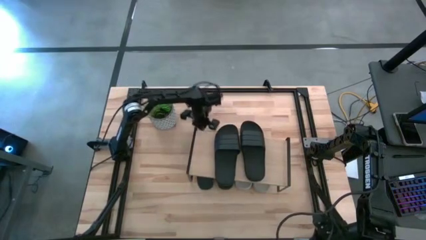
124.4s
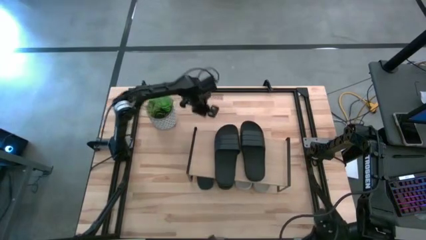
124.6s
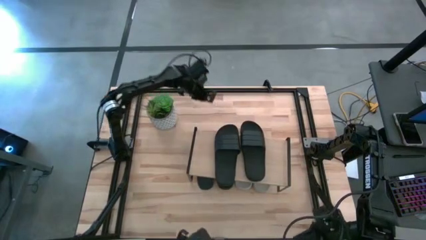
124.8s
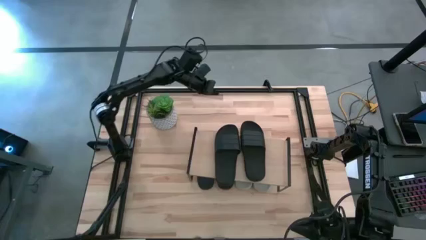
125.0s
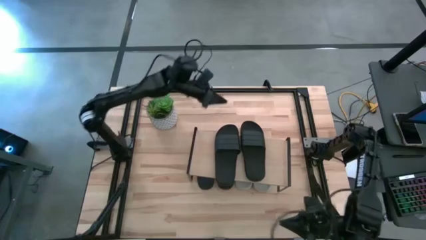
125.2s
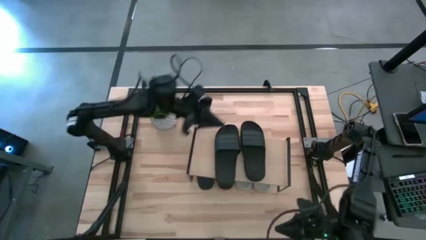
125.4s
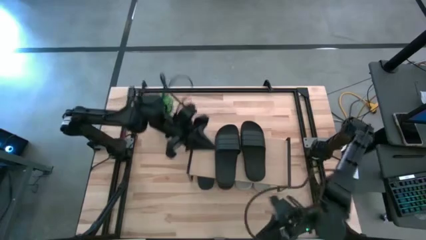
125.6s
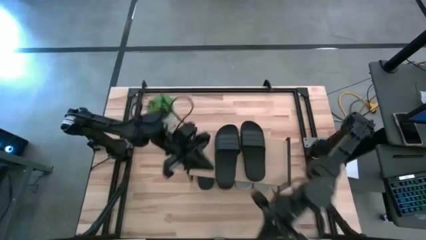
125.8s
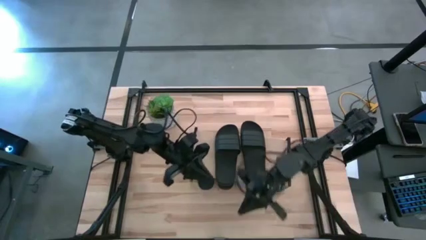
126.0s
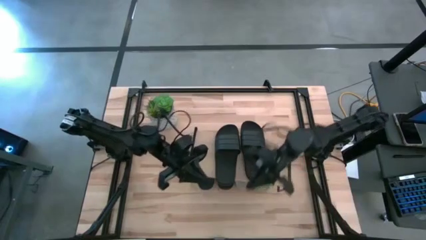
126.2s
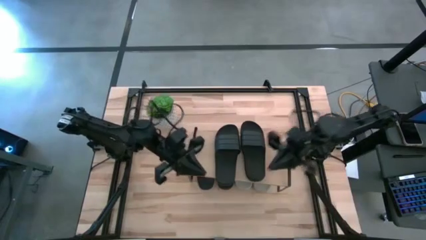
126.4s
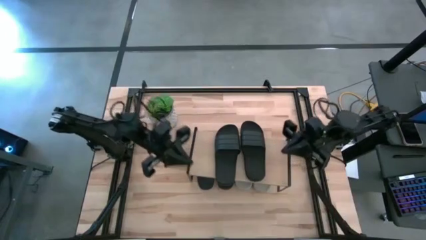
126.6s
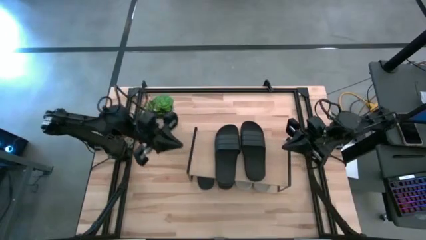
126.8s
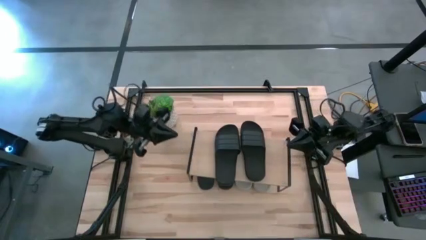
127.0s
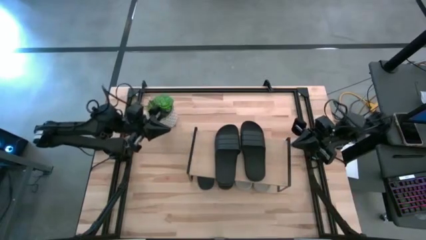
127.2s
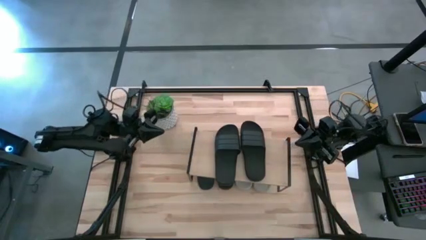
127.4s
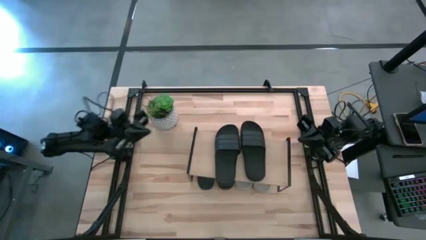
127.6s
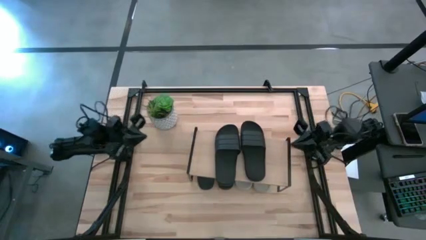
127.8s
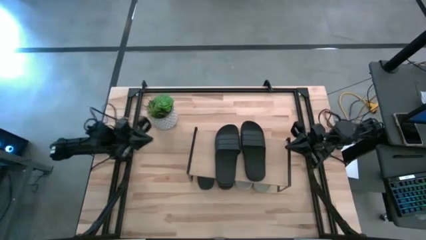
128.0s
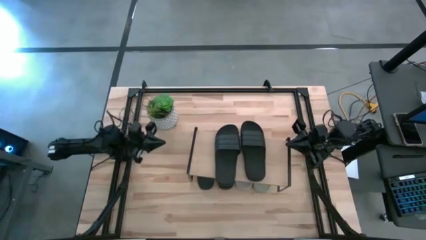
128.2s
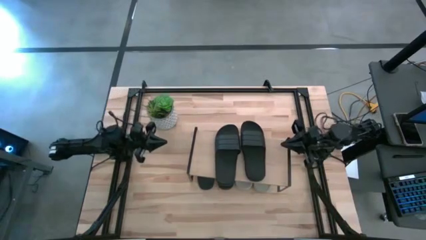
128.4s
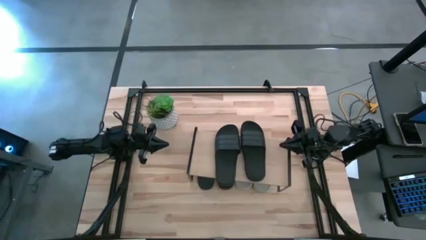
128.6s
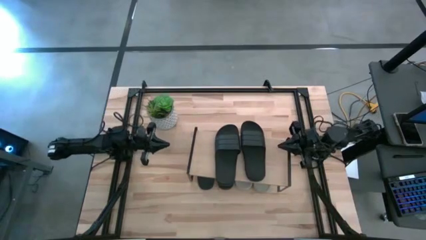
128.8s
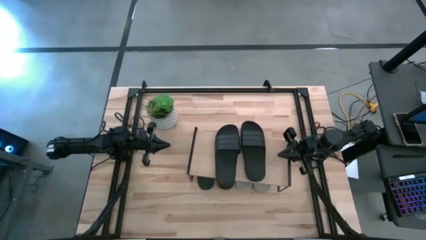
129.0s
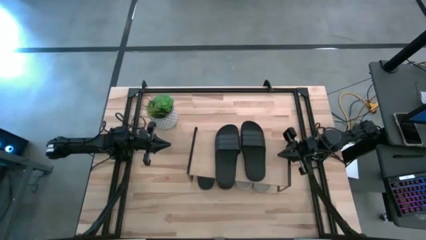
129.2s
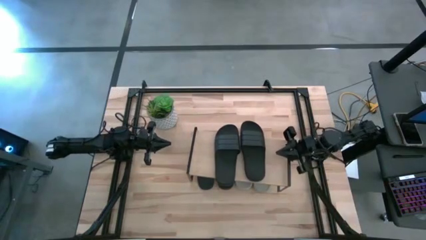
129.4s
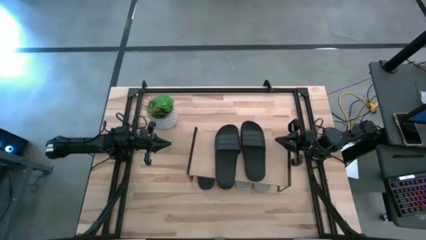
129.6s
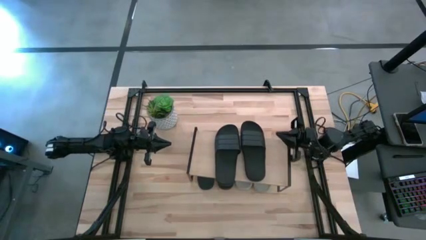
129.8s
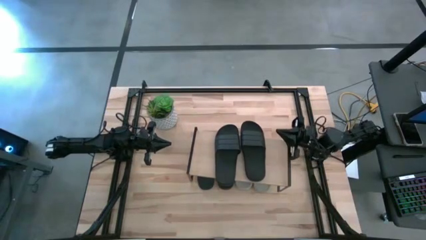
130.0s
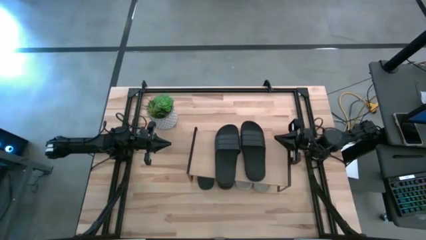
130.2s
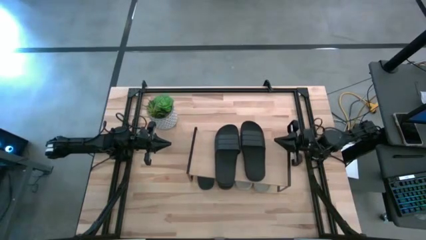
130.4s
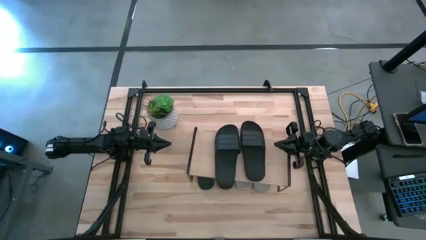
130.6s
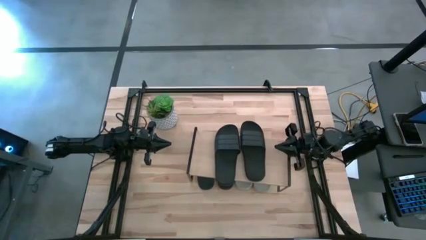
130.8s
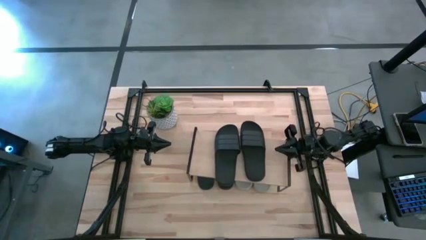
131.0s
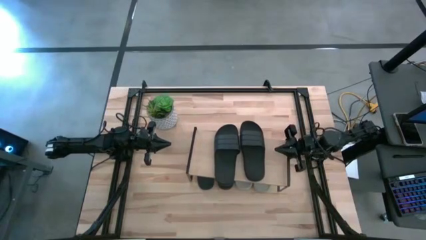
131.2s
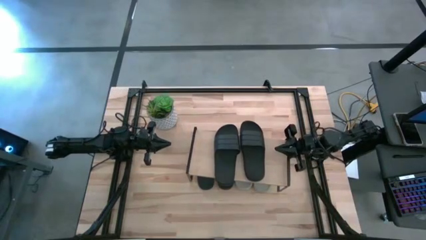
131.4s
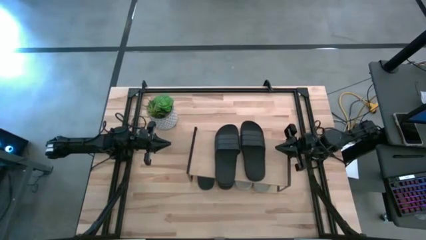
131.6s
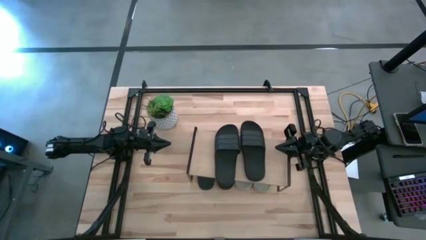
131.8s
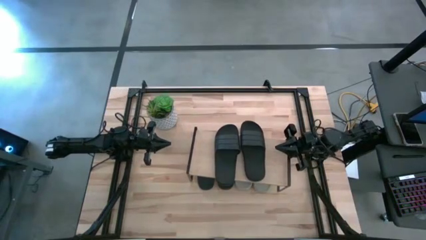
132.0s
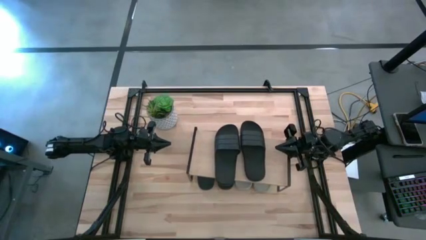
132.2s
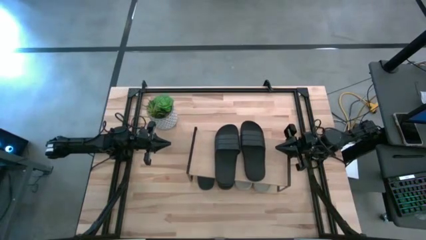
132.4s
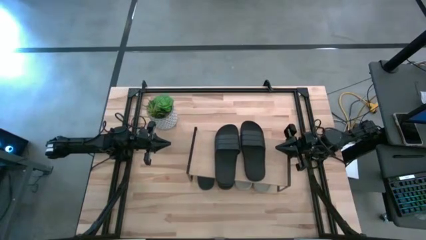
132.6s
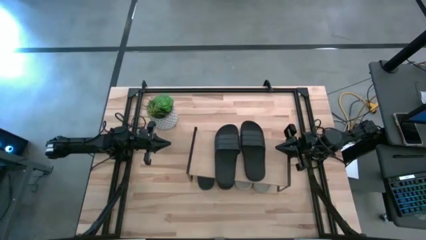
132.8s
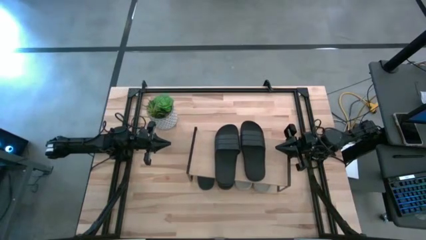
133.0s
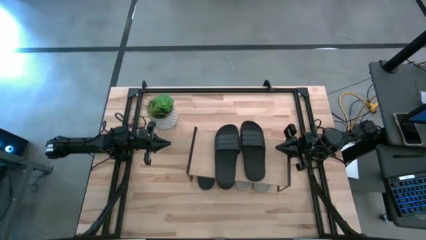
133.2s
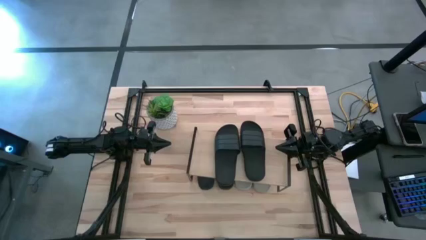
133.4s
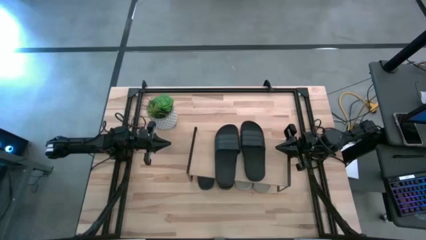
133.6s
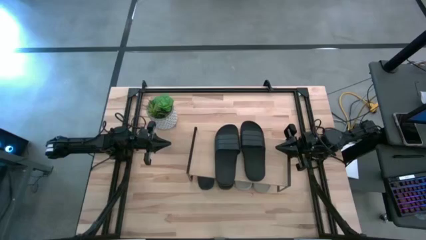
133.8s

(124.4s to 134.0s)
Task: Pick and place slides into the shelf
Return to Home Position

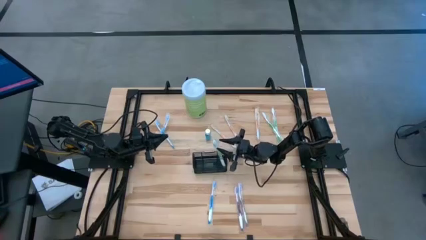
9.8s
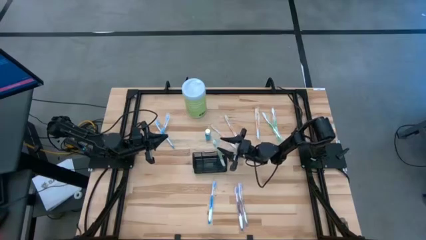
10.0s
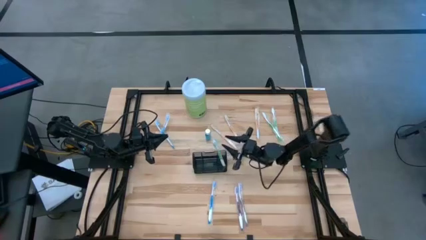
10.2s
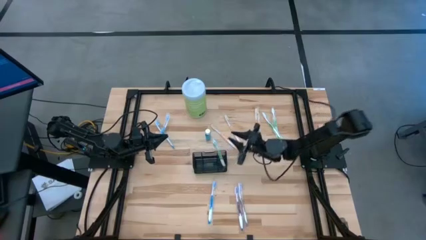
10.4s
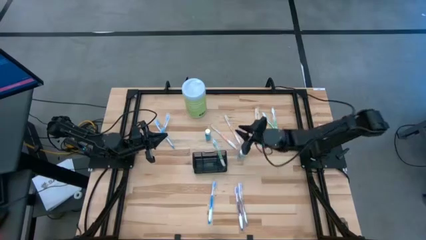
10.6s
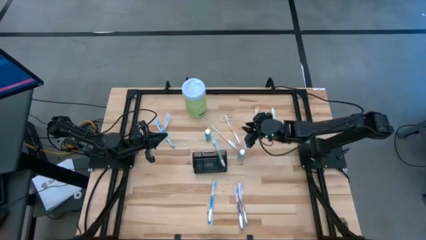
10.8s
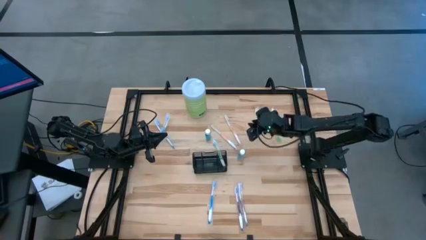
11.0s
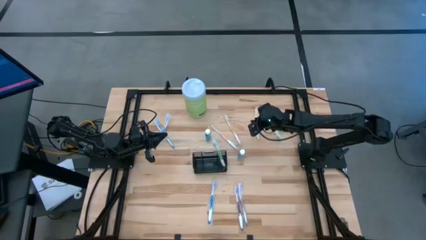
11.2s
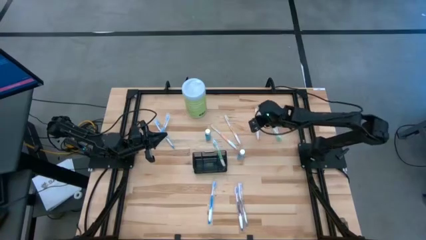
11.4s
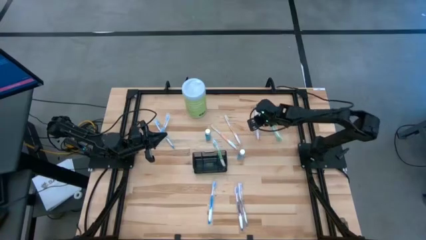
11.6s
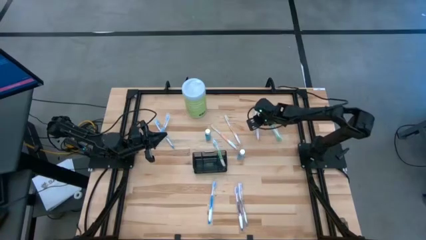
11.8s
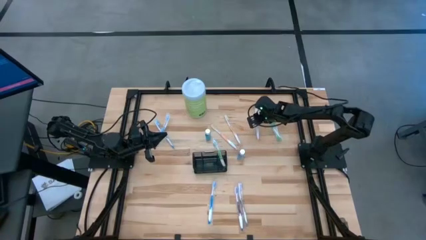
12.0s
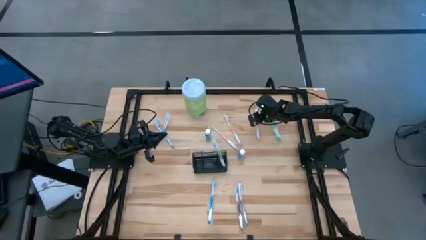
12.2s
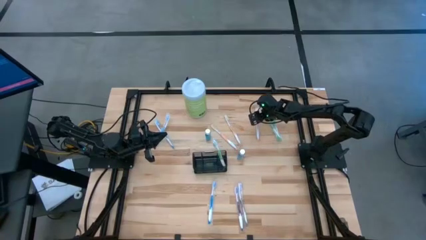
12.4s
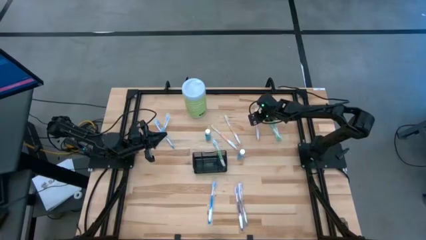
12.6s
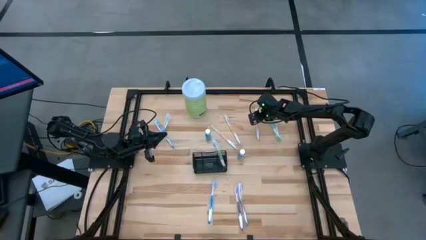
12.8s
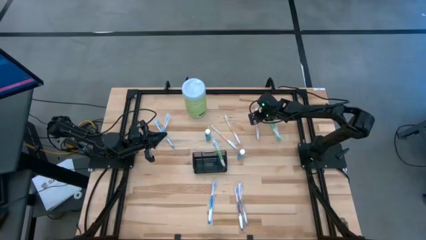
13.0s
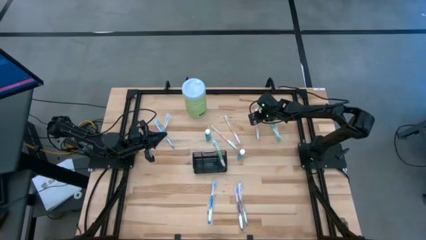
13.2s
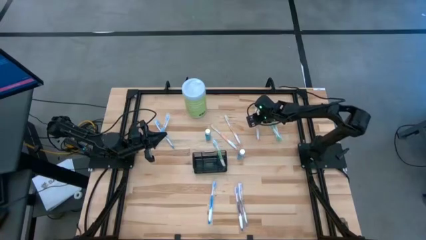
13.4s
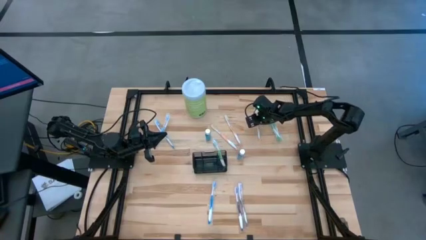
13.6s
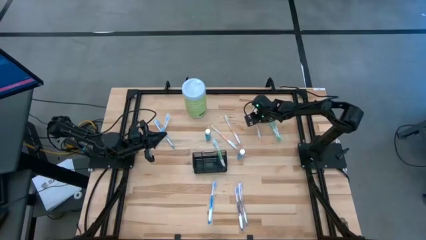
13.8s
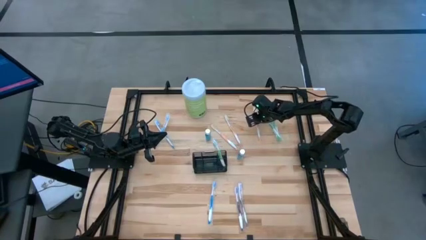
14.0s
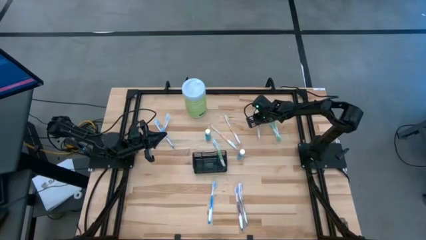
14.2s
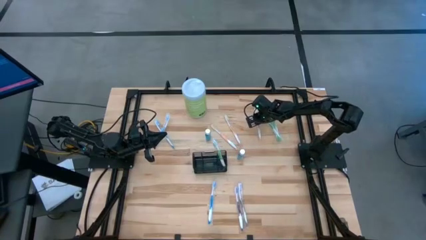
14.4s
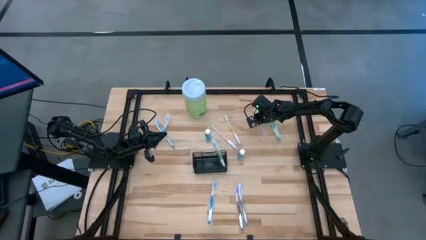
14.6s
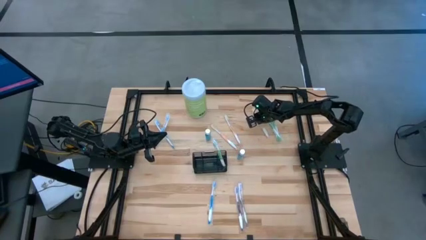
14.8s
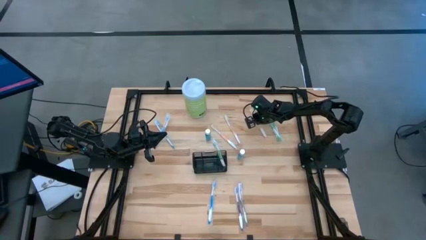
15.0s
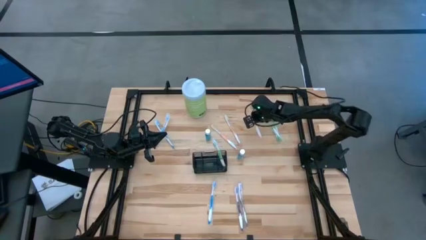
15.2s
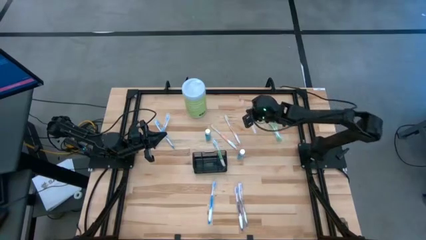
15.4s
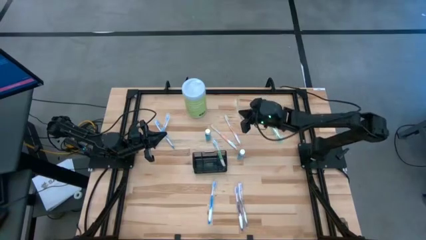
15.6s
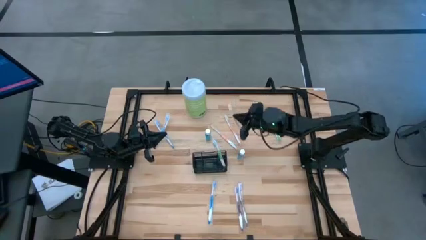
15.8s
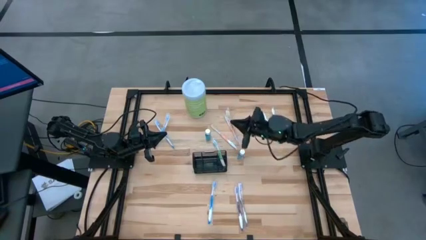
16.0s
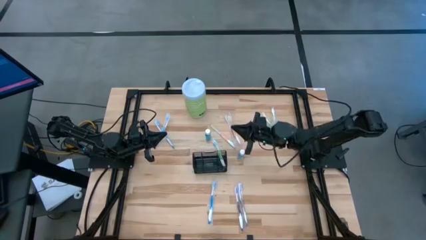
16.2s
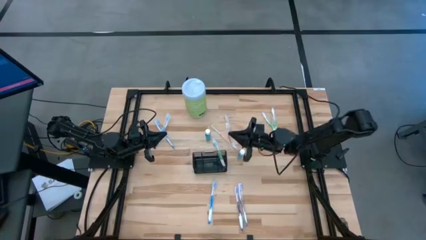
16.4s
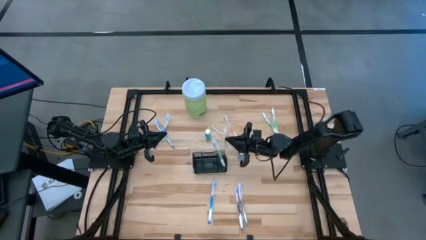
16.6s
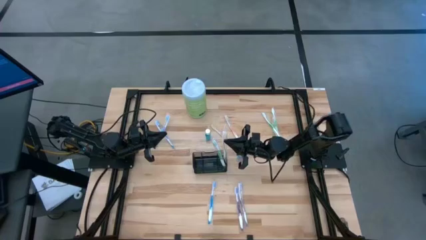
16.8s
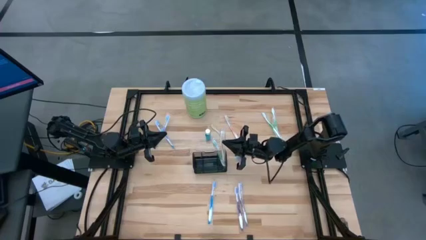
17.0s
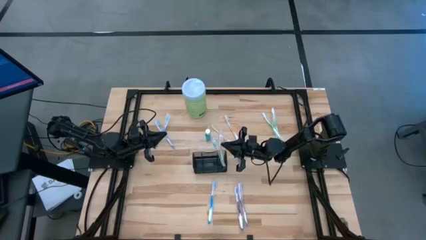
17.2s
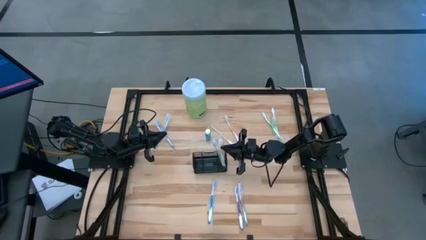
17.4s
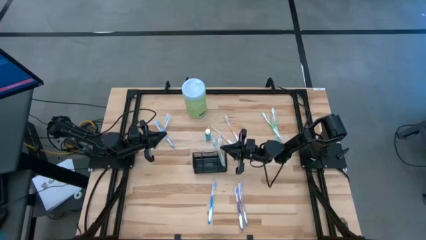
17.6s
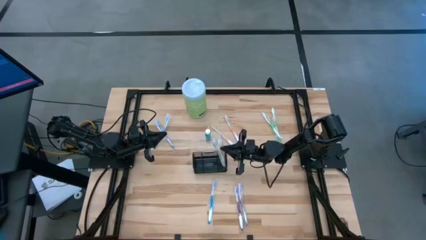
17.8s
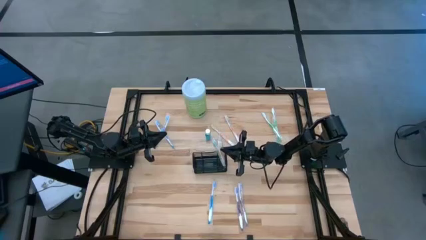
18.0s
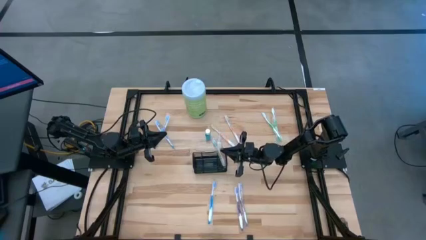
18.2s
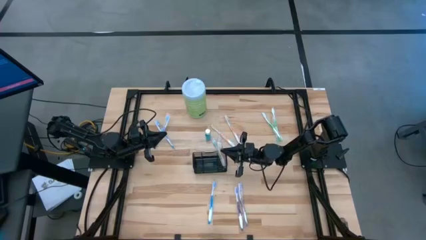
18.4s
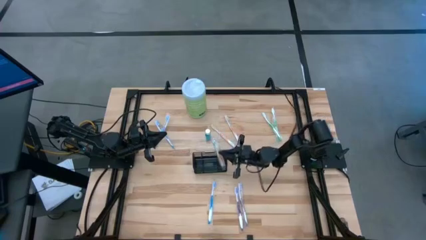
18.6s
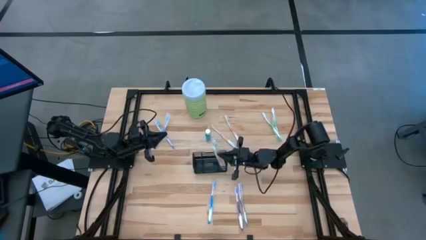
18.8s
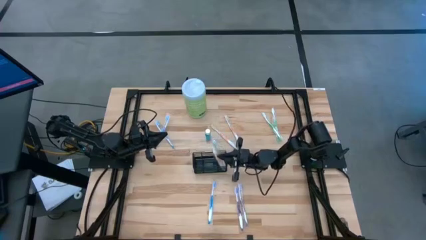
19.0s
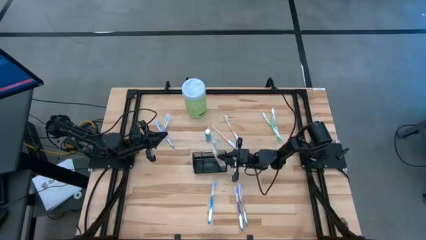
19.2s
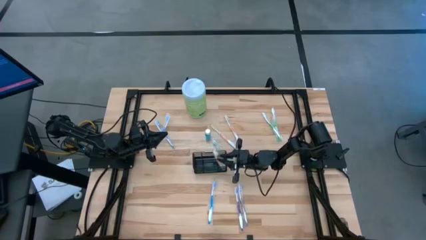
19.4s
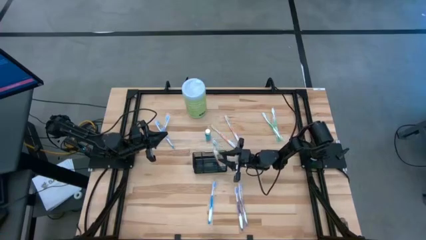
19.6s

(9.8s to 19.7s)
Task: Pick & Place toothbrushing station
Put the right orange toothbrush into the wire organizer
